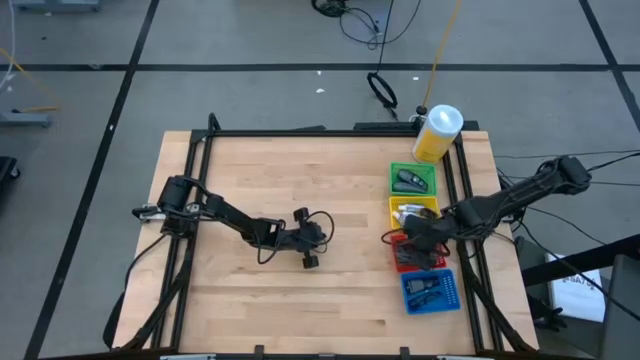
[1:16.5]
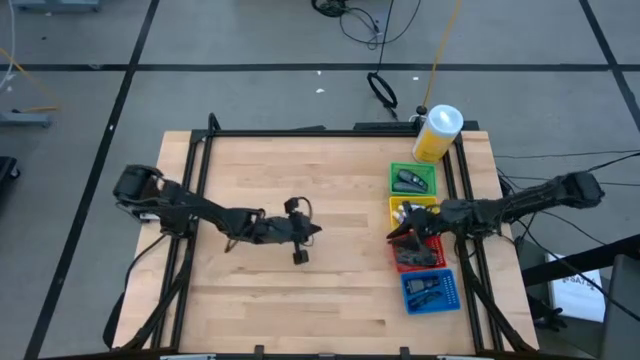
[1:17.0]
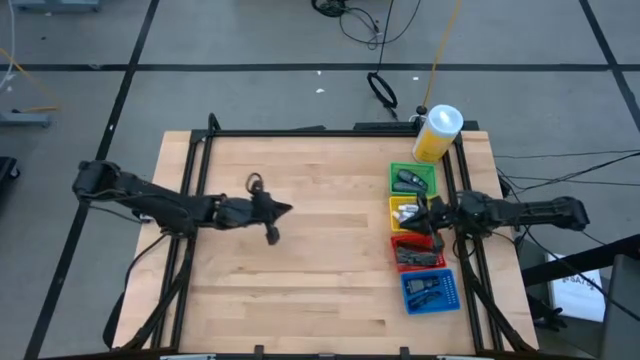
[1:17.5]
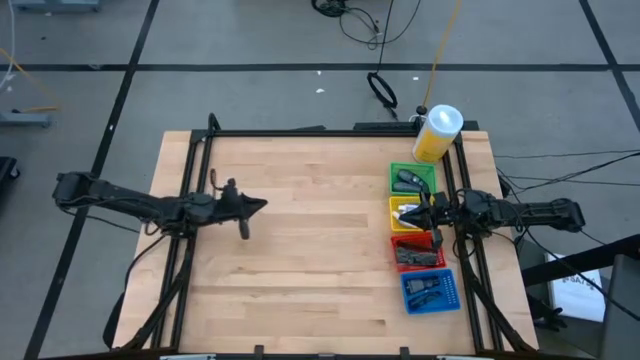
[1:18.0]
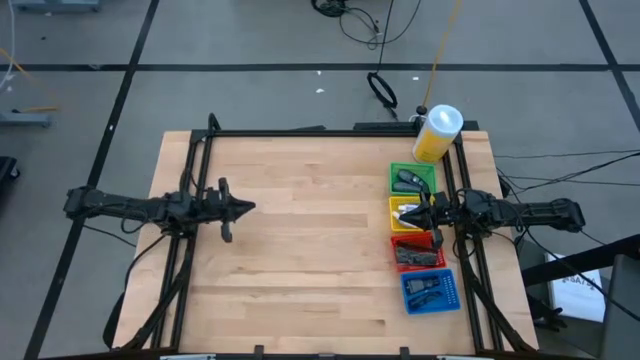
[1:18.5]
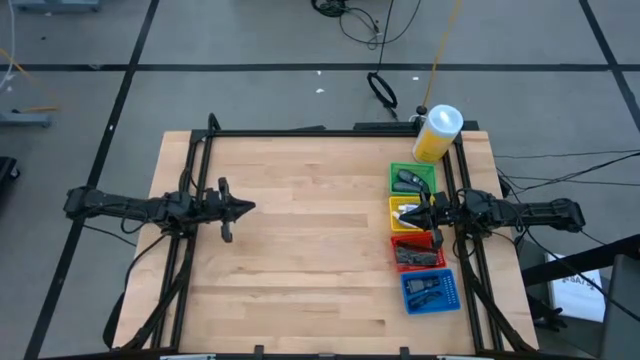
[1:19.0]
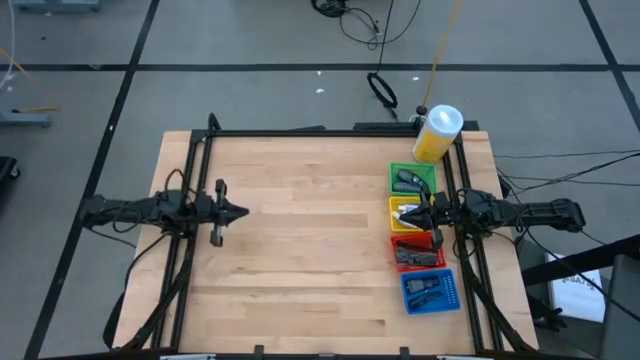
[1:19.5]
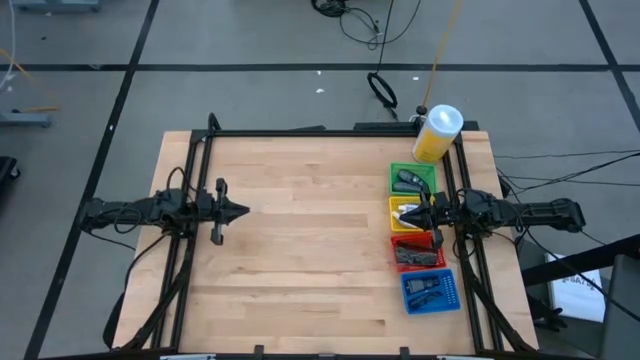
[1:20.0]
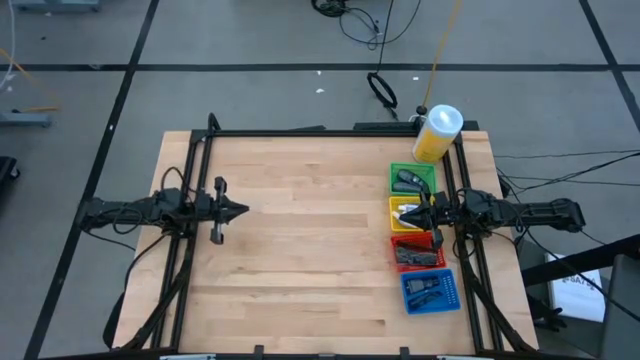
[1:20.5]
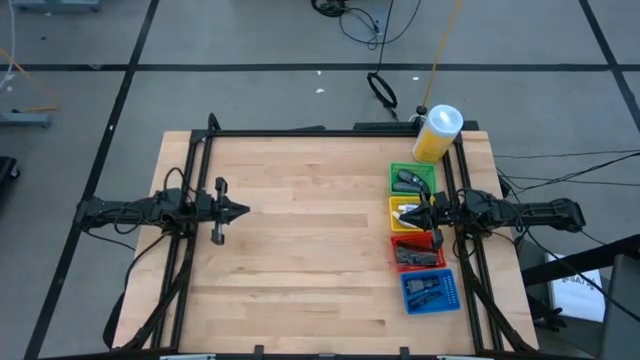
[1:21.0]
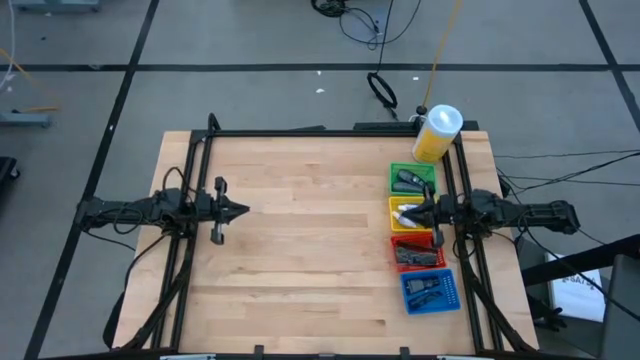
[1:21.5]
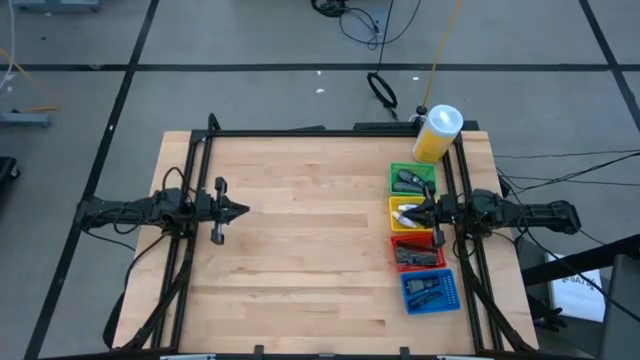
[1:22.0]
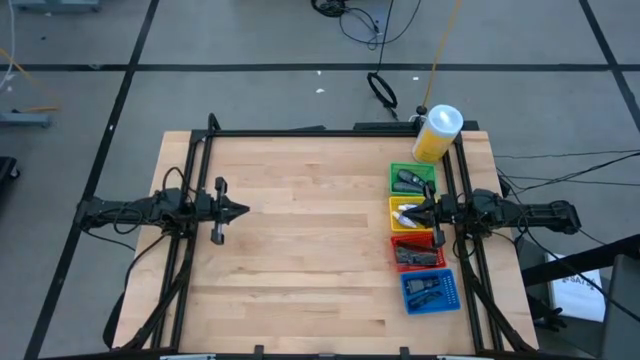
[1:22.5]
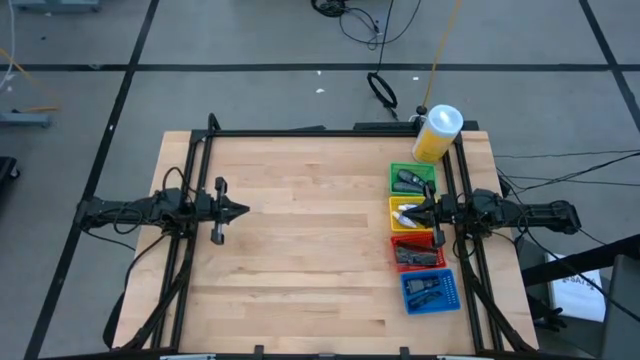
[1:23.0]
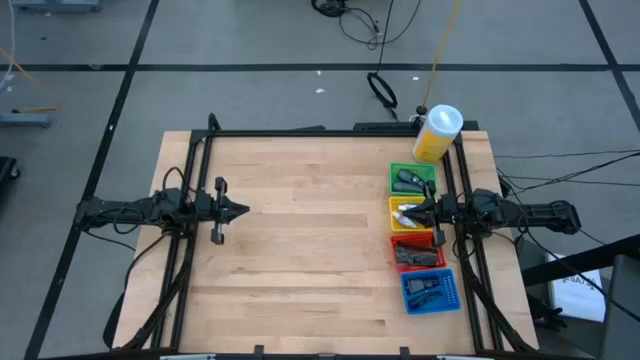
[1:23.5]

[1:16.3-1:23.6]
Task: Pick & Place Travel size toiletries
Return to Home Position

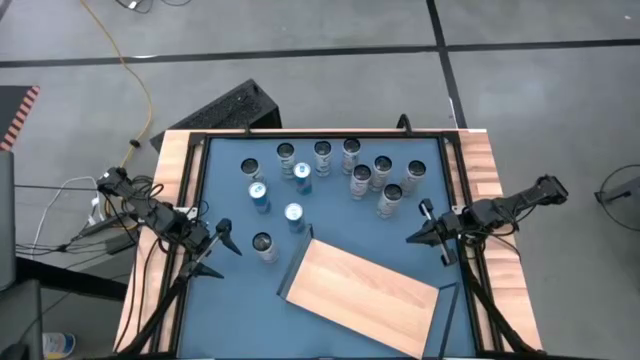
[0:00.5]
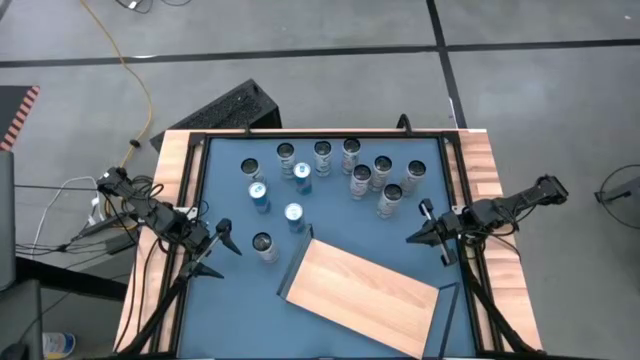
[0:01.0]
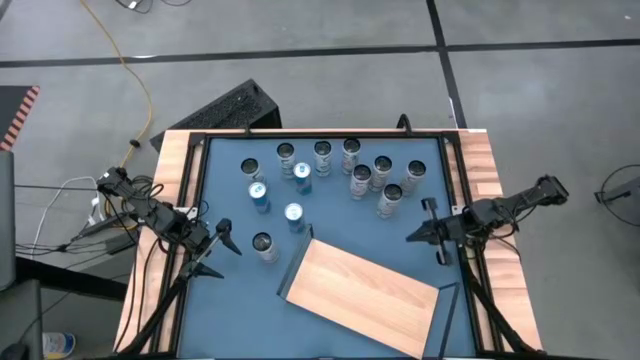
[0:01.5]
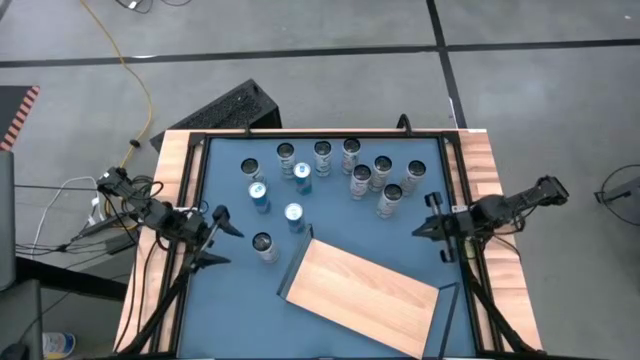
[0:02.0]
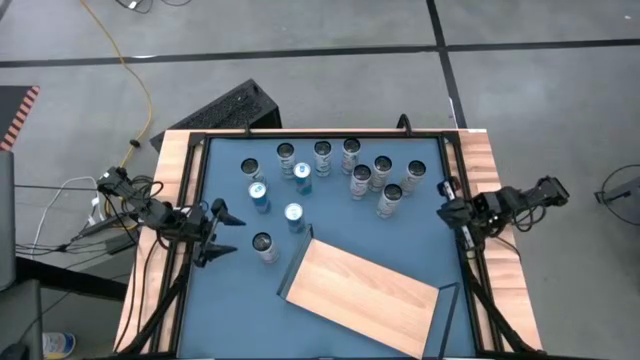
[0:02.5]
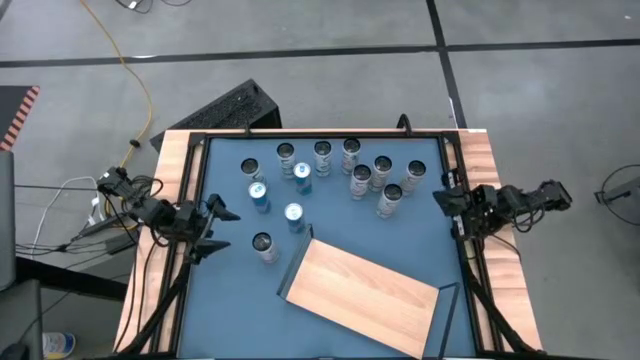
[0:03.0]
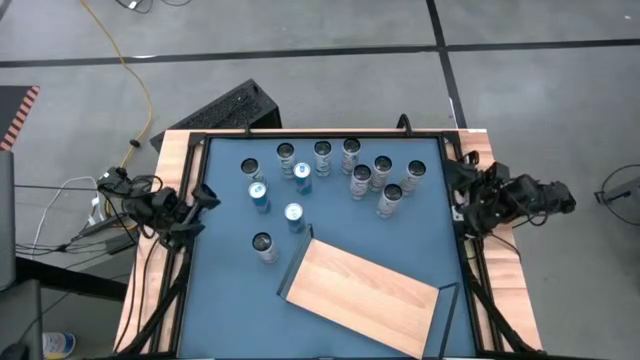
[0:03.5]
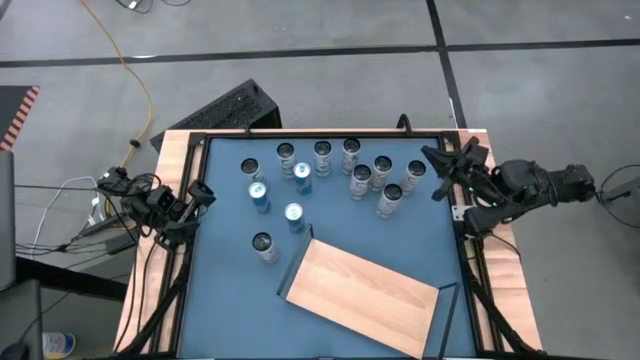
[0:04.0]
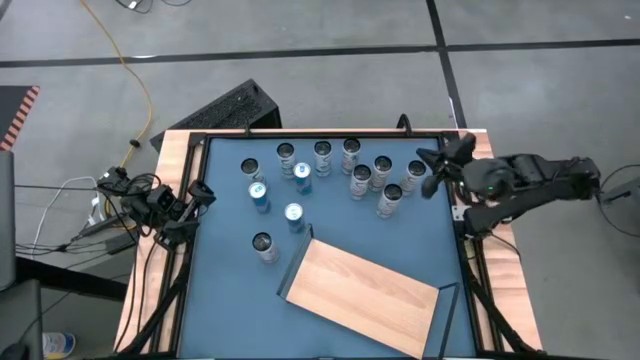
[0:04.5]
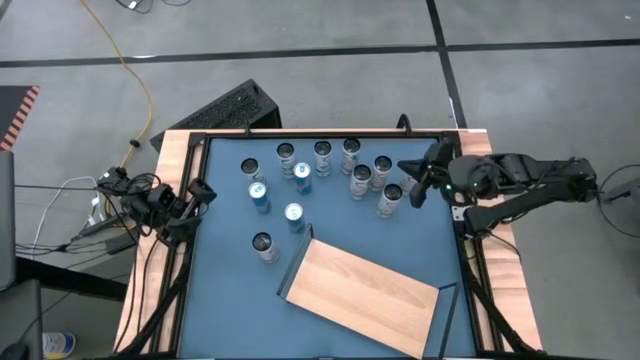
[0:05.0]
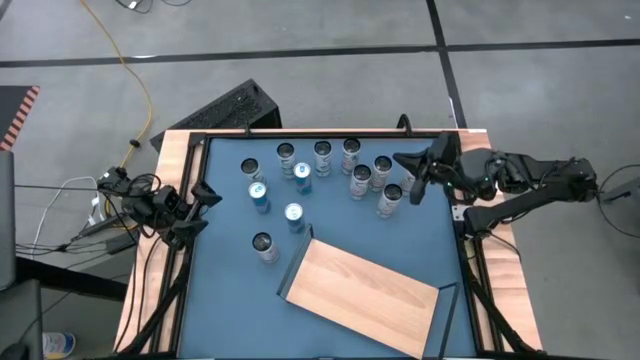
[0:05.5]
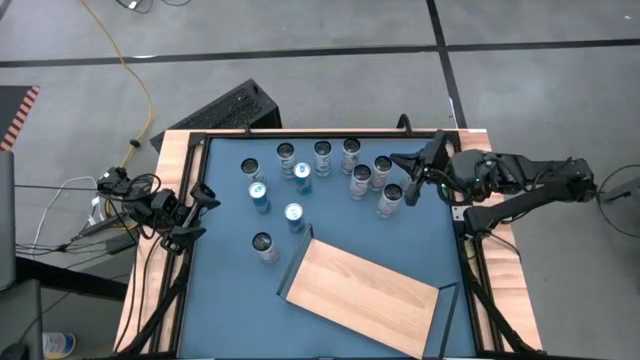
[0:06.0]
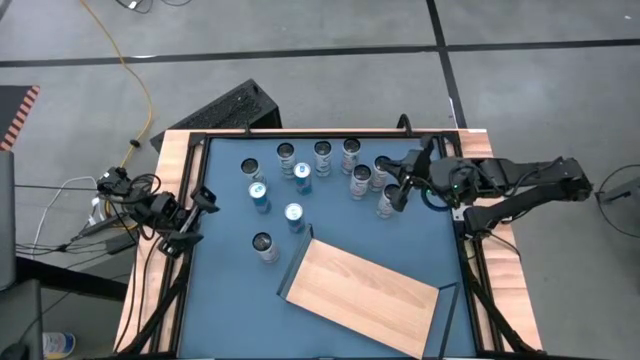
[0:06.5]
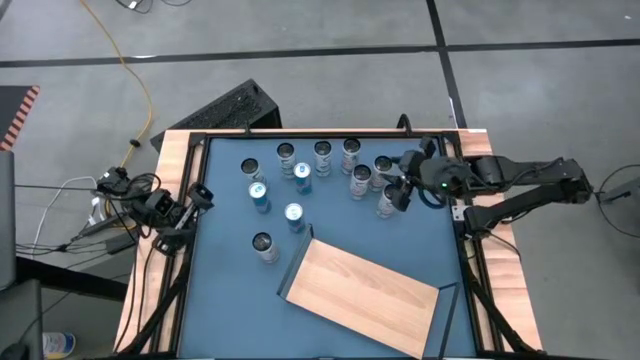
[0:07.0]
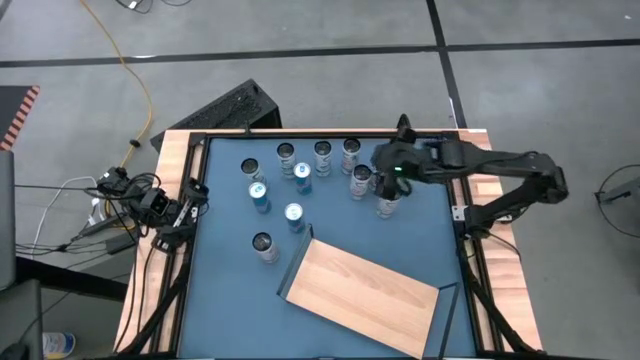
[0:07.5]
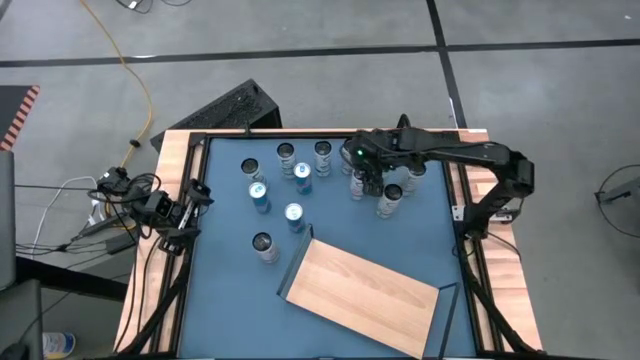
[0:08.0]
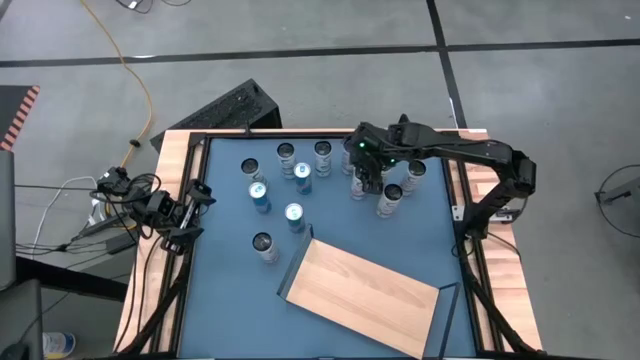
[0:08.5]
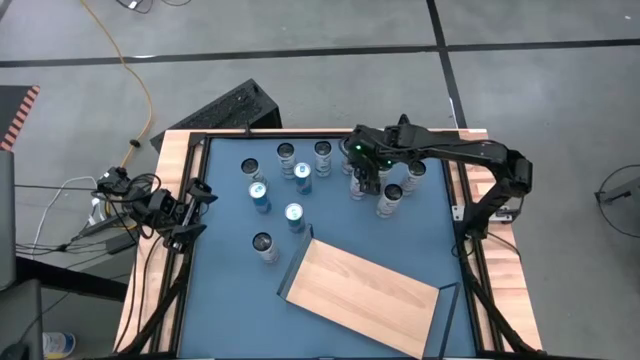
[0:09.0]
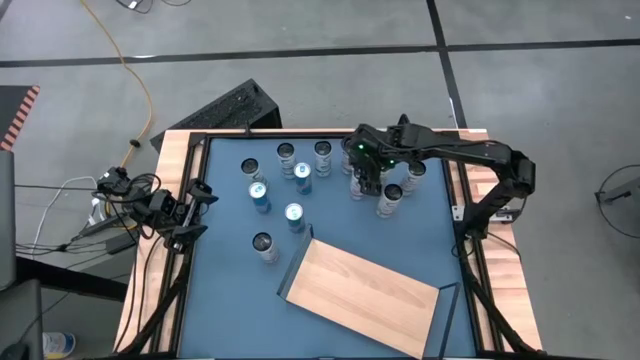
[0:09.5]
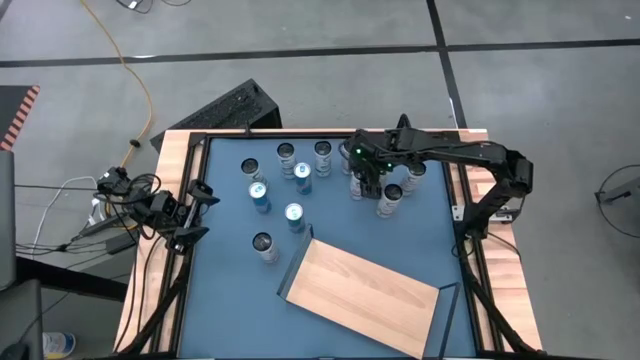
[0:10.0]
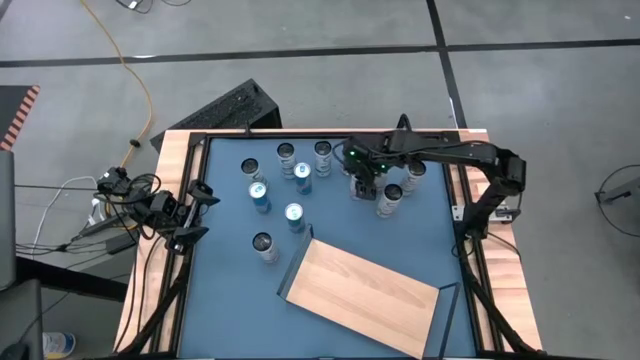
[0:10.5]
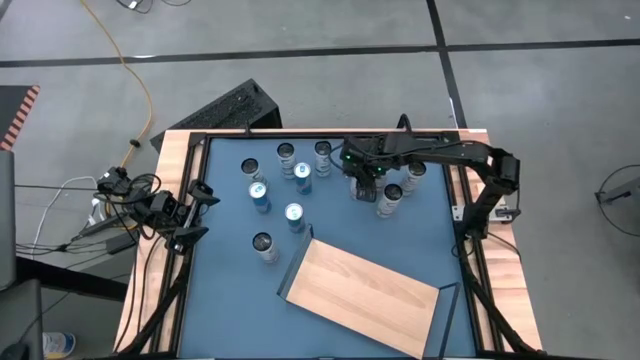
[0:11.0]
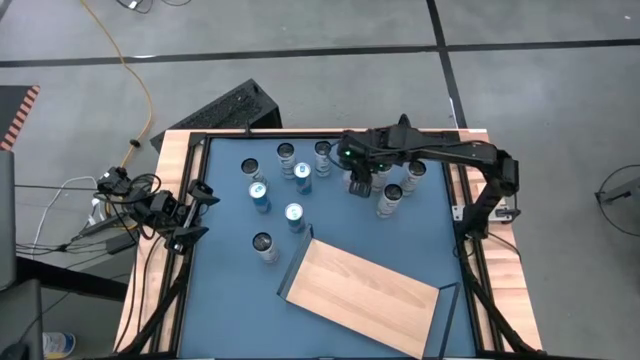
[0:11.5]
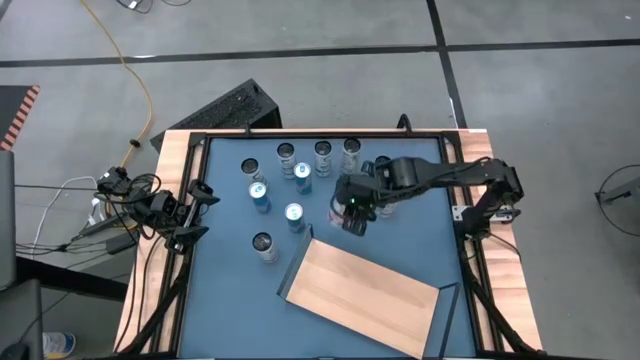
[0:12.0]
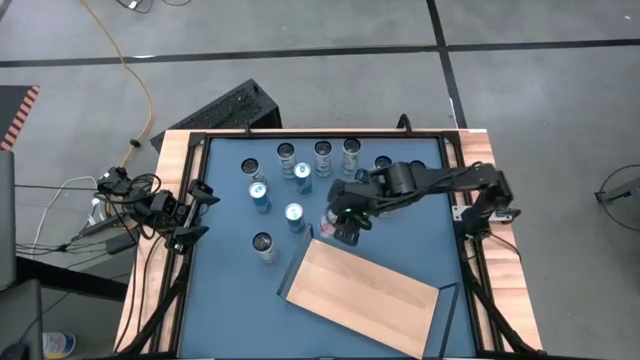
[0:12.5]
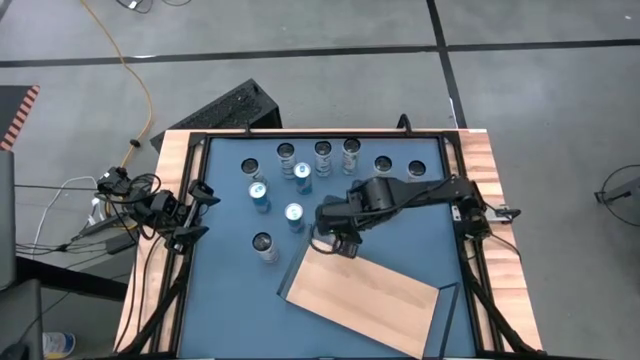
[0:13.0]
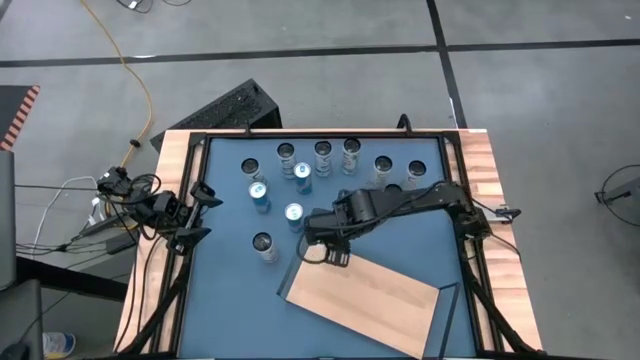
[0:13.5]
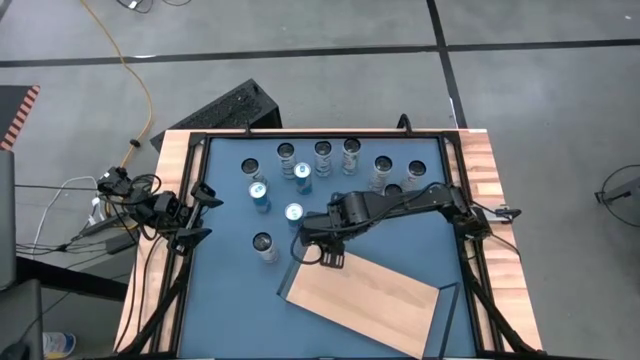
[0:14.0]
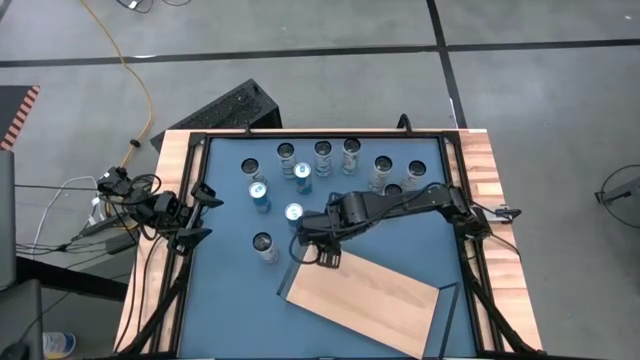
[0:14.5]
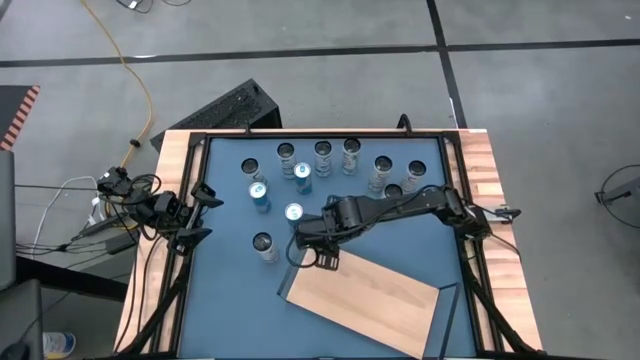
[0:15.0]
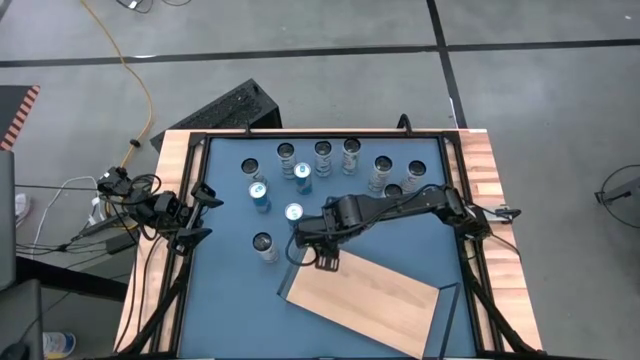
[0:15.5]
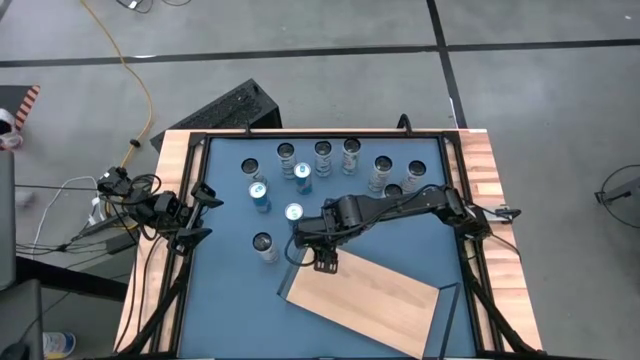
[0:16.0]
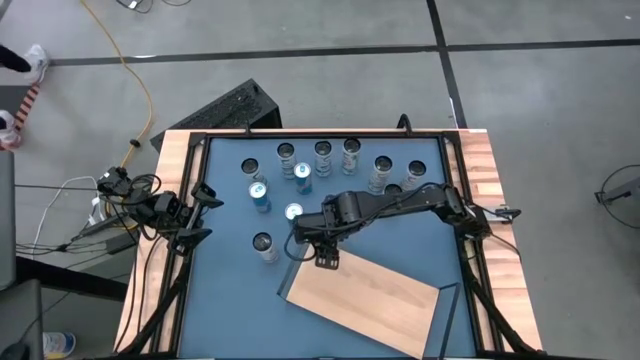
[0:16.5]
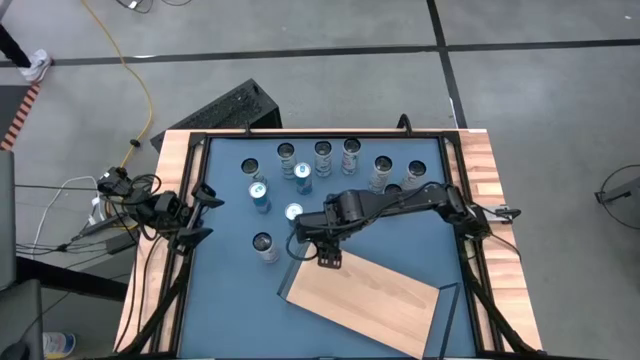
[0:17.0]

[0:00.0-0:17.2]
Task: Place canned beverage on shelf
Put the middle white pink soda can on the shelf
